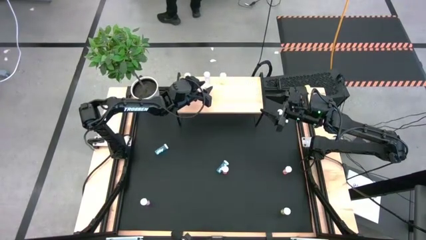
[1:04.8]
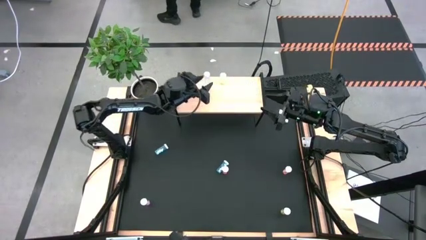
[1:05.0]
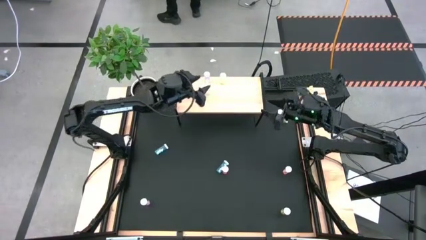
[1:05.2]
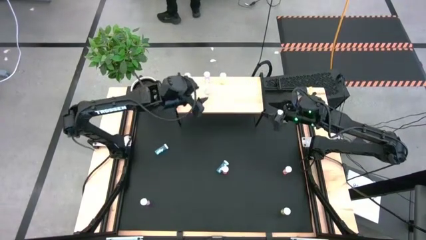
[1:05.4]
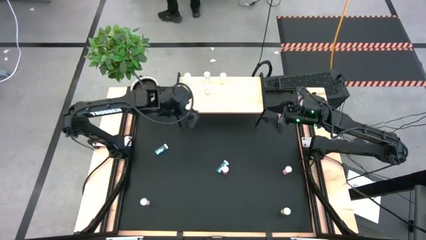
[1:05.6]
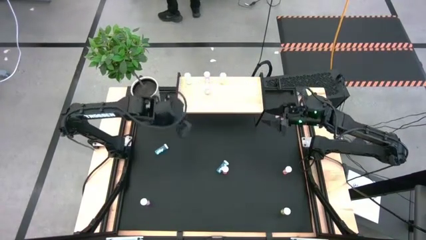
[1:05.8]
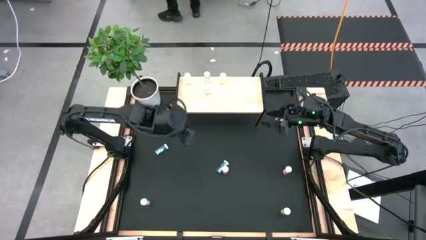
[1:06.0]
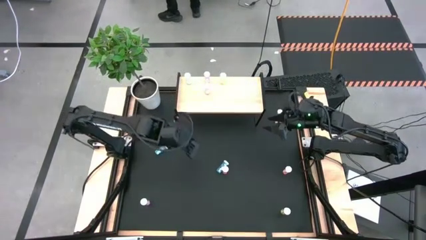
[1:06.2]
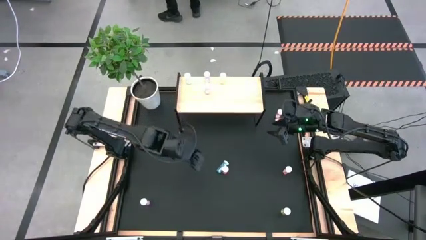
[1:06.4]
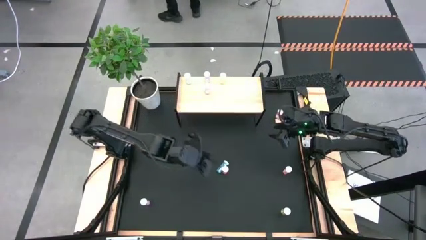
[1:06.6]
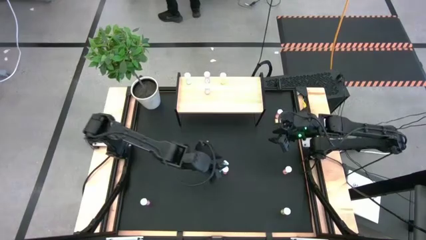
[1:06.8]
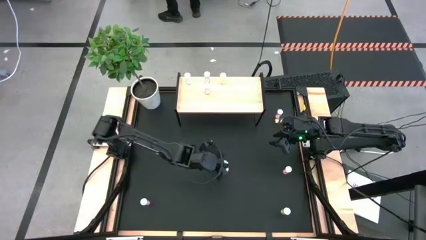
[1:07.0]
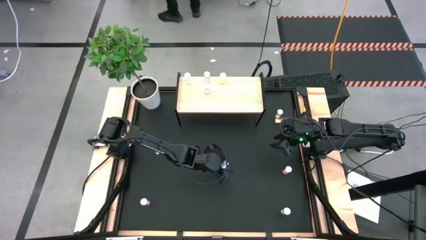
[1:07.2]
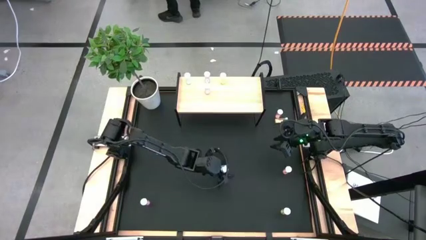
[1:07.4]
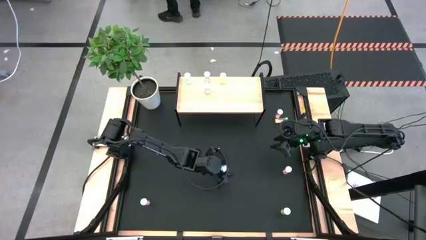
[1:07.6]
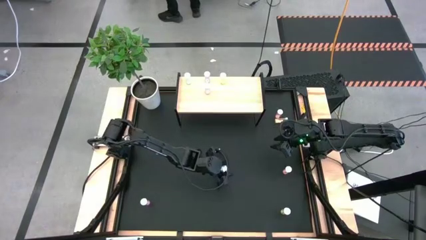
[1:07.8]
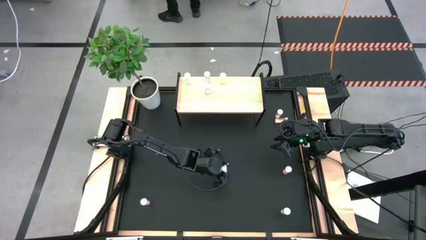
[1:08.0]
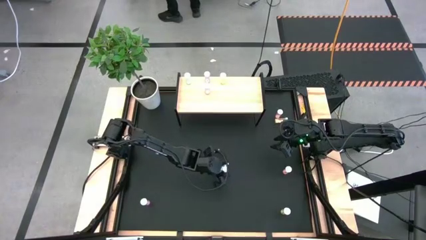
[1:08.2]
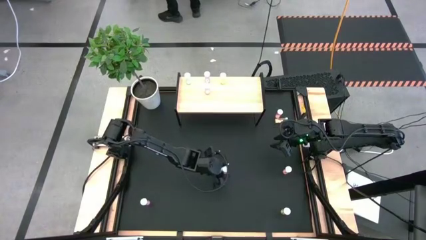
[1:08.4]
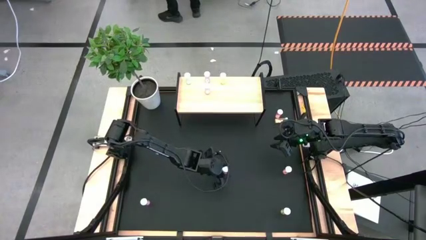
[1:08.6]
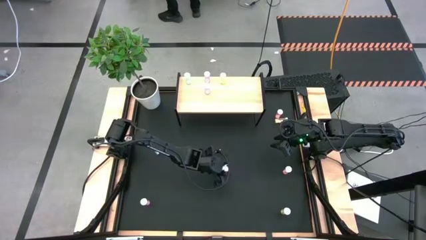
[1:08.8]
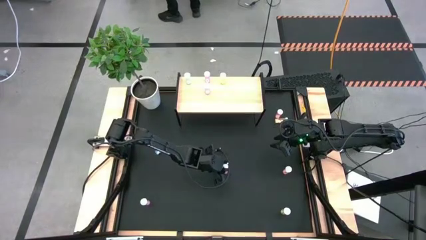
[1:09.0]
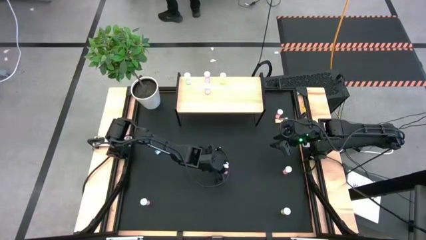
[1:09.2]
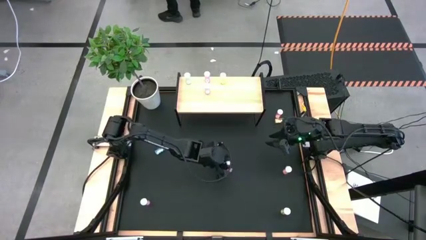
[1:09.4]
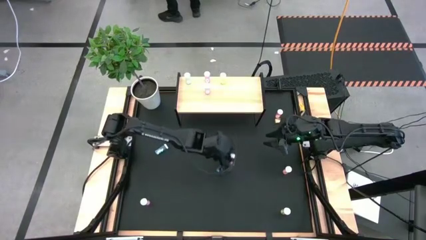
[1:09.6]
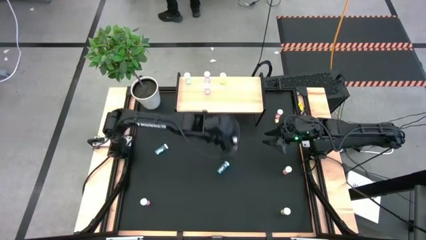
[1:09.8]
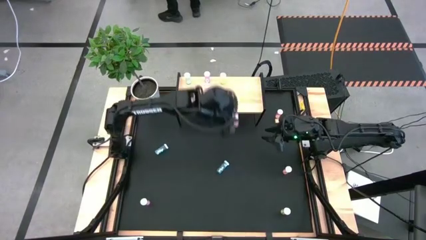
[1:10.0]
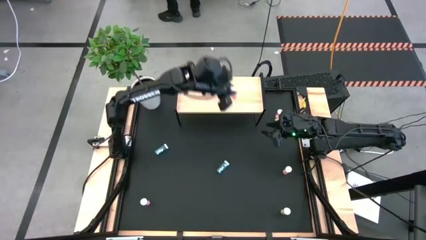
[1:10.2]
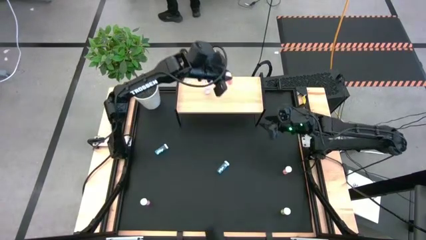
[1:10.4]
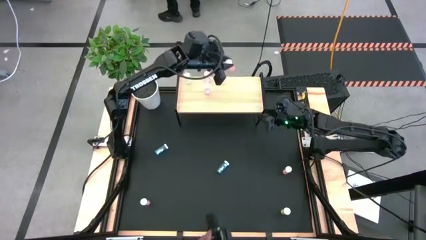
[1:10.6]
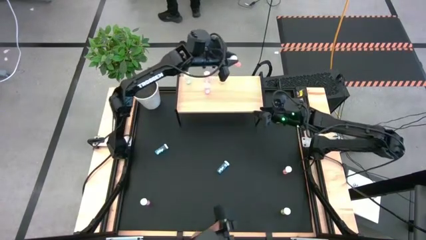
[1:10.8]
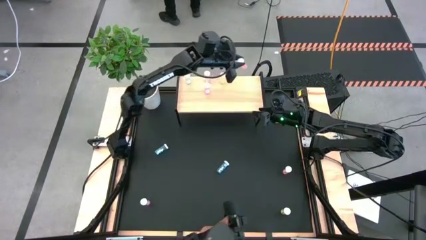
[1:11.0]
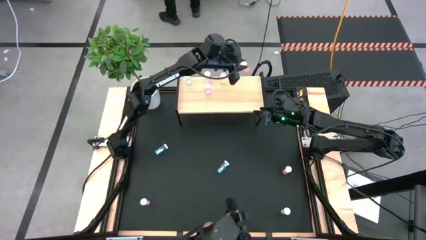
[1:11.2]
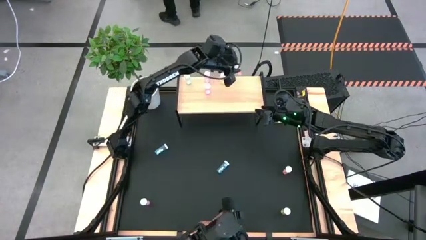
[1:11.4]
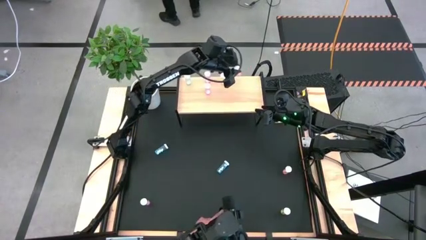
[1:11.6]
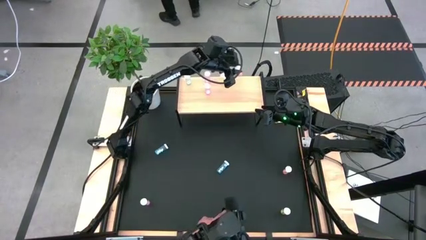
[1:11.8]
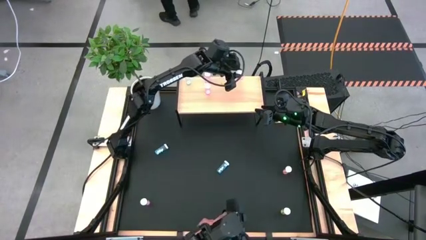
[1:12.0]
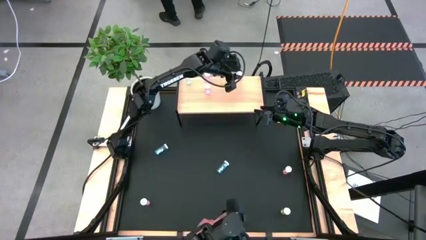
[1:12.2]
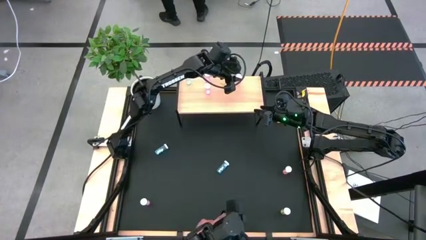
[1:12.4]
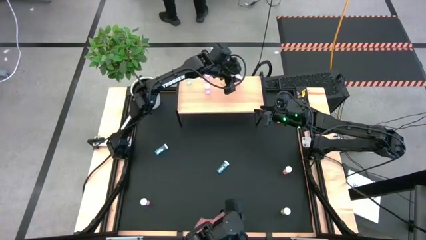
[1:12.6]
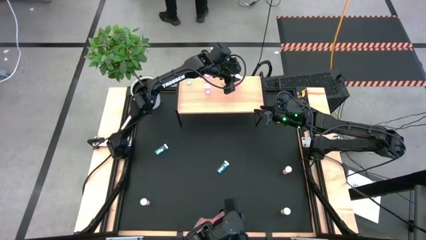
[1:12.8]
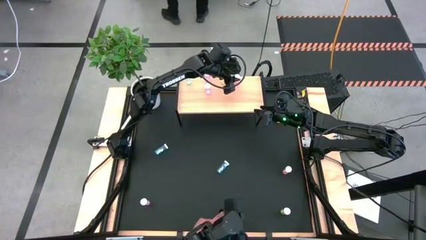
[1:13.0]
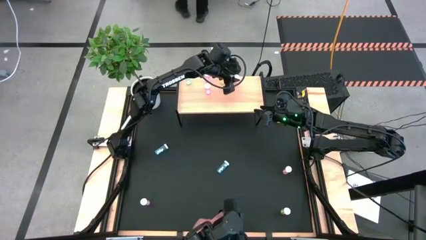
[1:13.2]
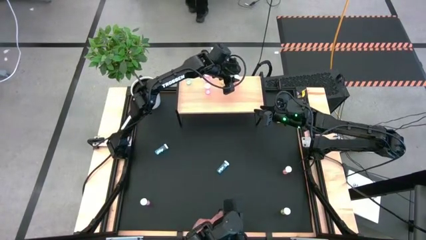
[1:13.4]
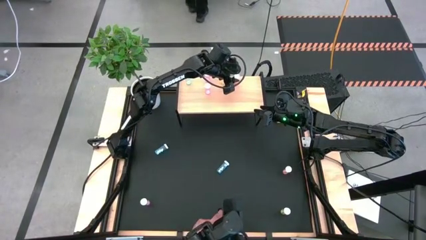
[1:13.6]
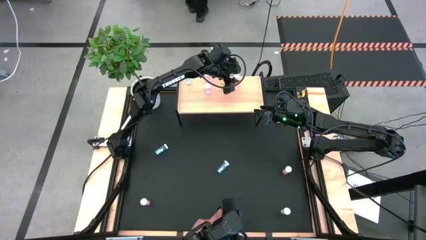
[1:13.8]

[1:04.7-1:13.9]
Task: Pick and place medicine bottles onto shelf by color
Put the bottom left orange bottle on the shelf

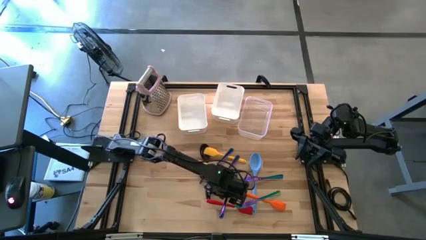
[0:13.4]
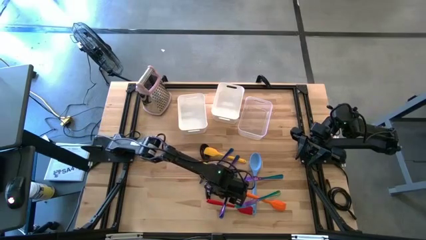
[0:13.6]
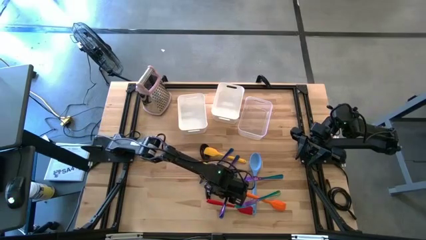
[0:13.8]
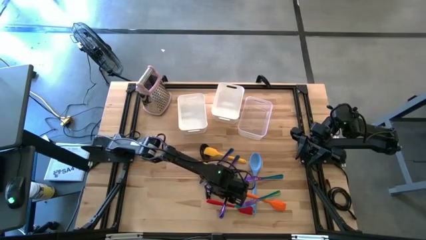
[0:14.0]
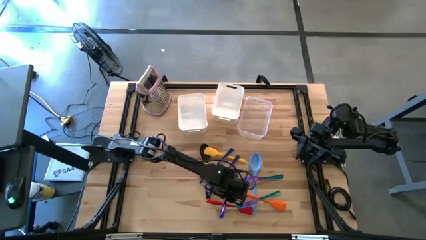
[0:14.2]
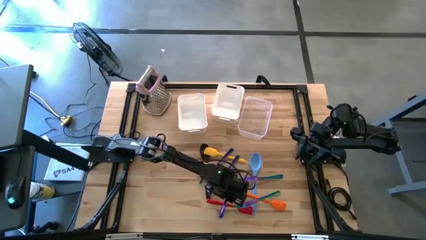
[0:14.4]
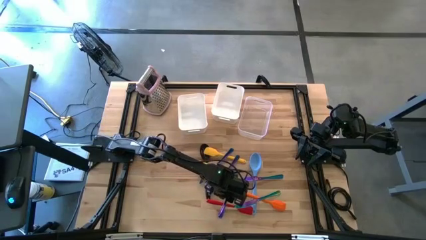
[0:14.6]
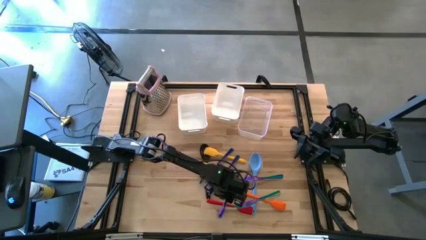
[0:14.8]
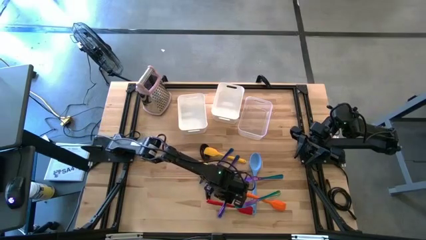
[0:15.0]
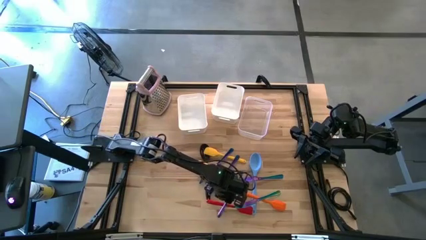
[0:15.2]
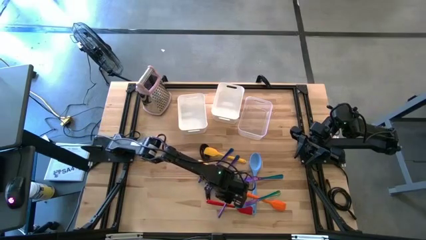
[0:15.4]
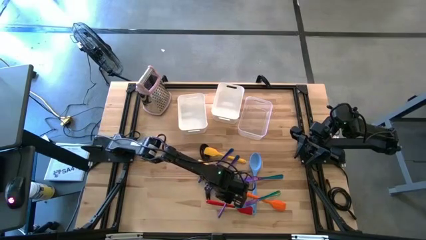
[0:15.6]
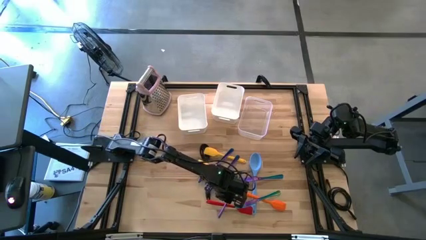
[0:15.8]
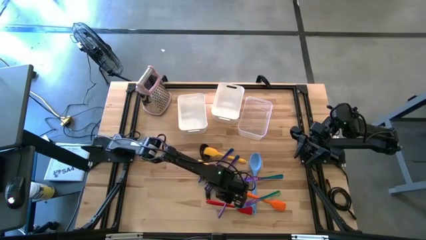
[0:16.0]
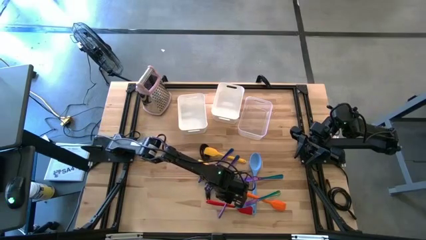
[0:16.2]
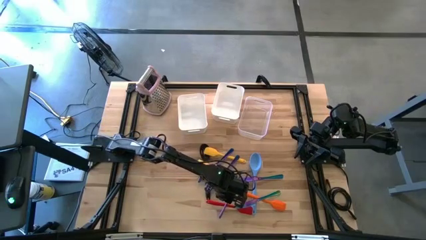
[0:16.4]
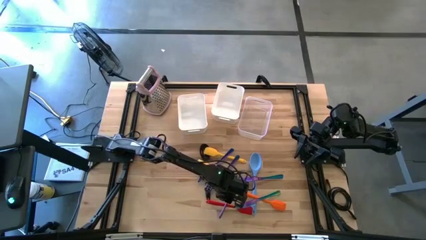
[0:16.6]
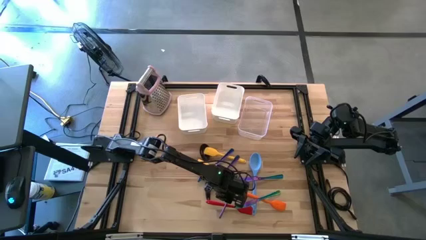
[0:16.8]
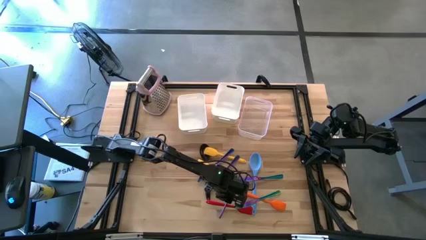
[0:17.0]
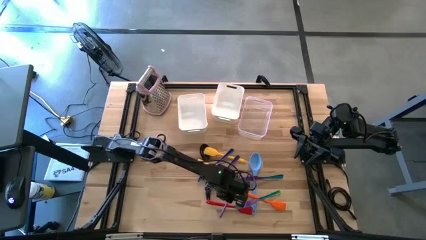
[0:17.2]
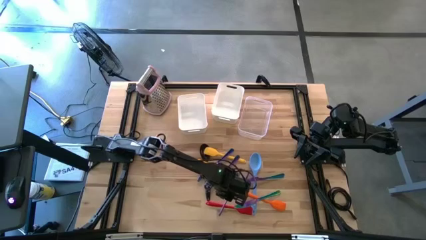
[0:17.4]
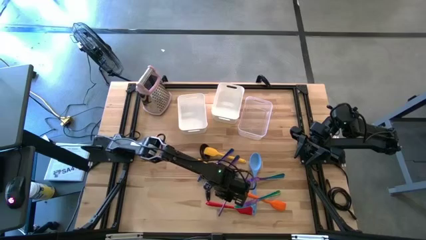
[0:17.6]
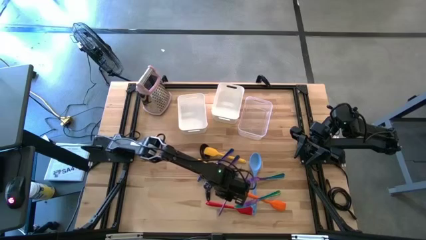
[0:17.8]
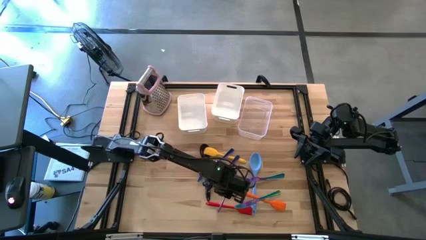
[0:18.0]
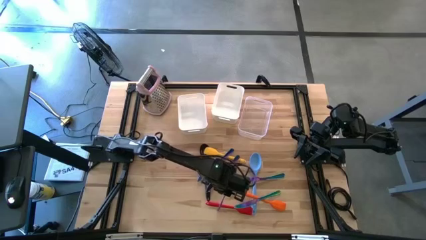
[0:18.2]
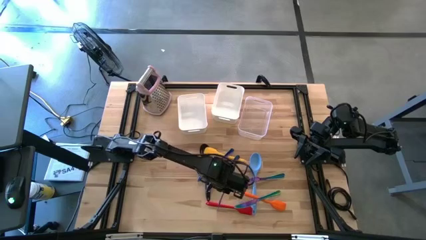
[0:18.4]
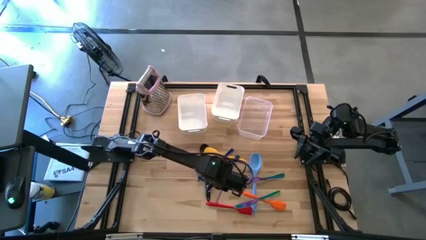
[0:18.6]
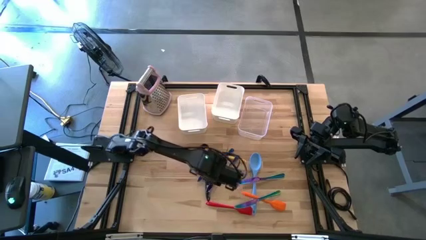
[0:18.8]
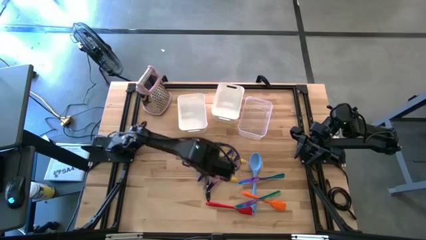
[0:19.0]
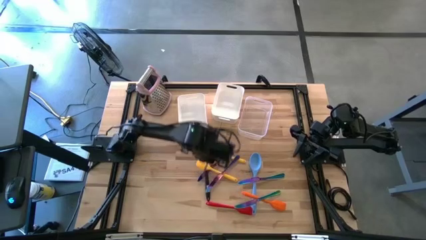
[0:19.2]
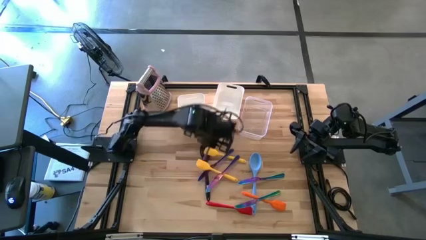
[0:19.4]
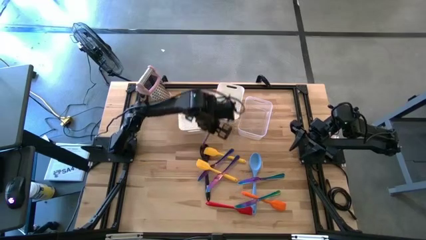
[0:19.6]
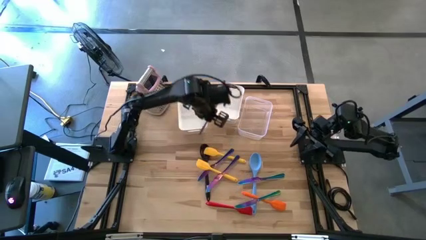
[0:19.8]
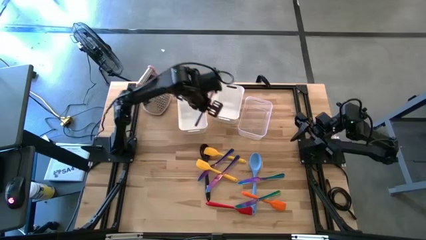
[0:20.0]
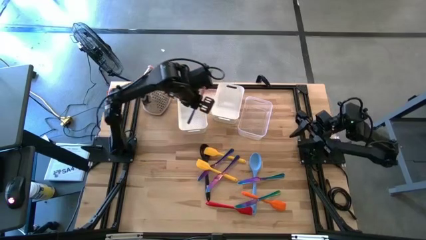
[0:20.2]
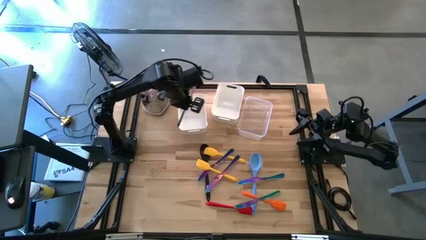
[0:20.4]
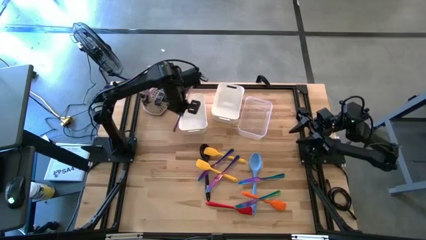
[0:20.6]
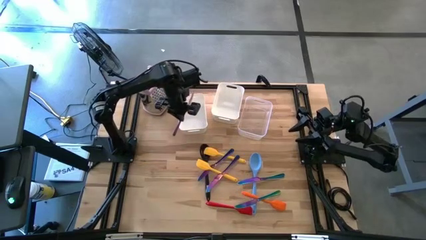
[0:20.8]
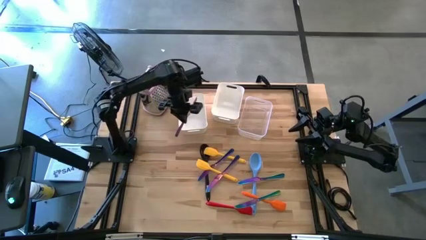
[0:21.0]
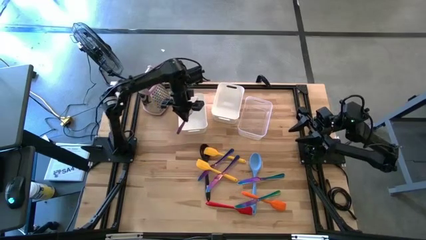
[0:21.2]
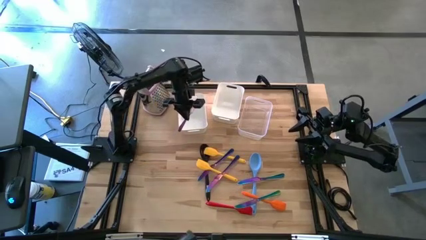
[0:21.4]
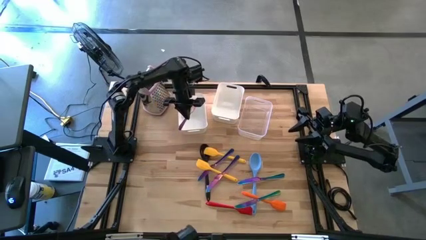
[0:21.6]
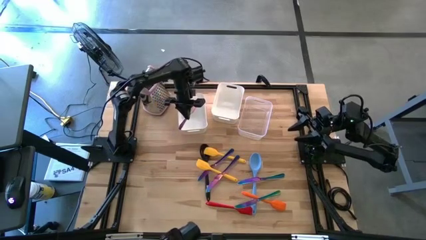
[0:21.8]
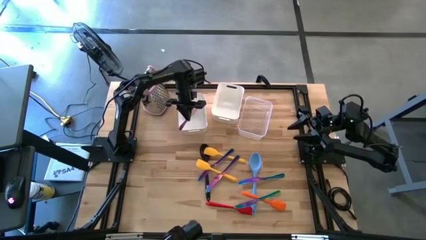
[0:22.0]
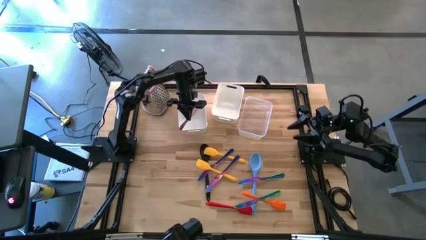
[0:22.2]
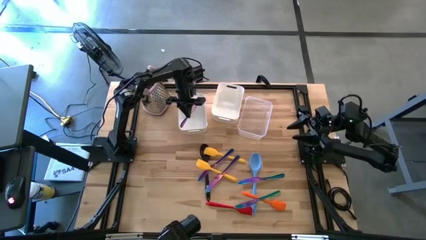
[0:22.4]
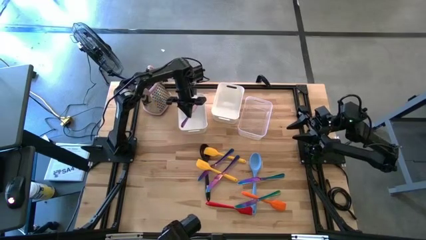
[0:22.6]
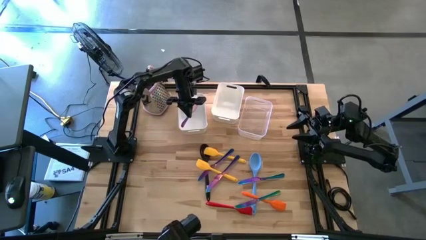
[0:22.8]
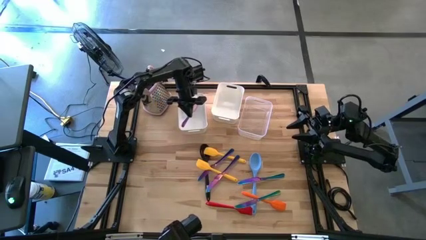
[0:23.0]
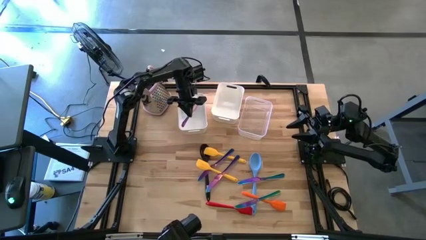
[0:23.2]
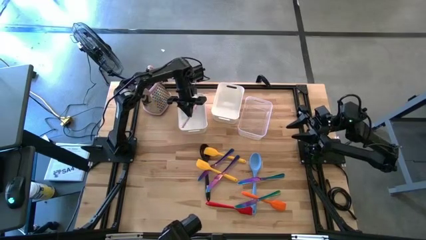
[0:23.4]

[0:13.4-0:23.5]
Task: Pick & Place Kitchen Items
Put the violet table knife into the left white bin
